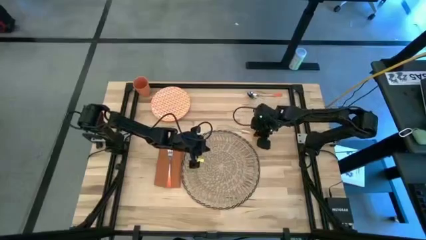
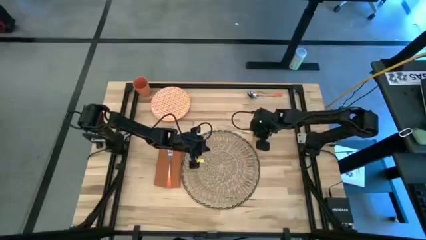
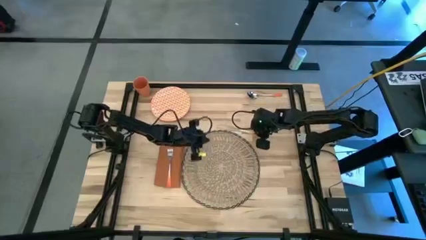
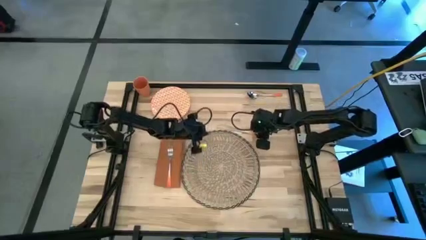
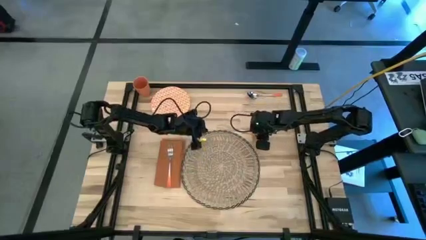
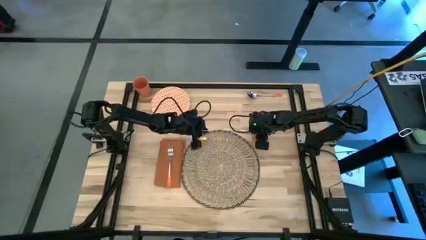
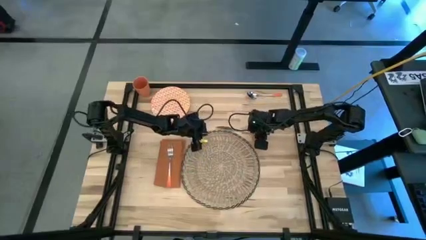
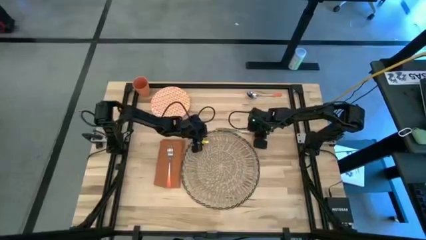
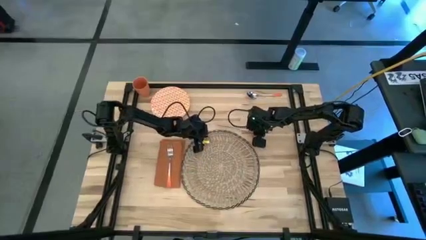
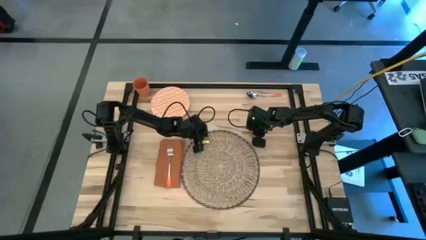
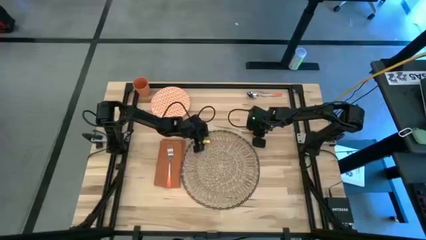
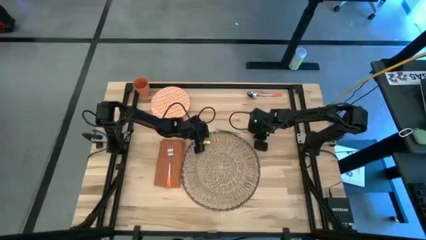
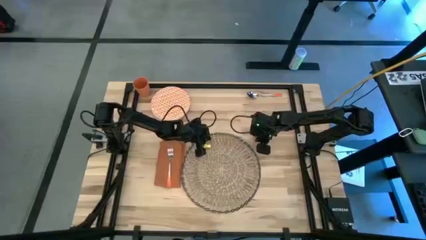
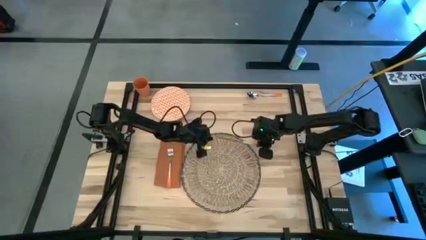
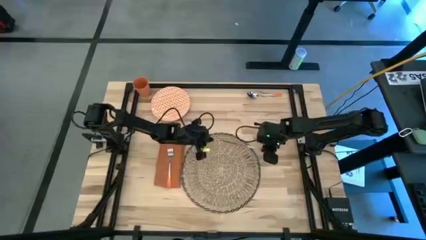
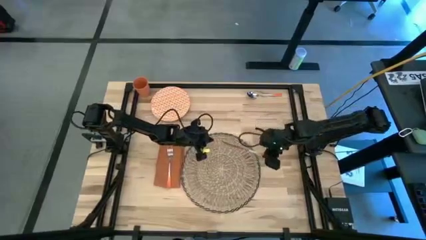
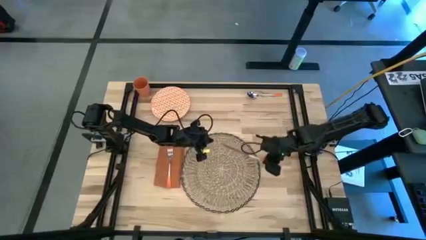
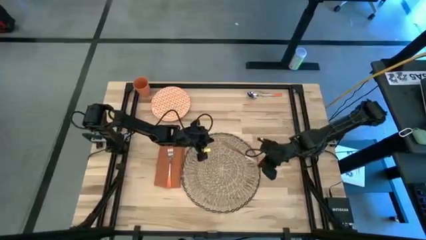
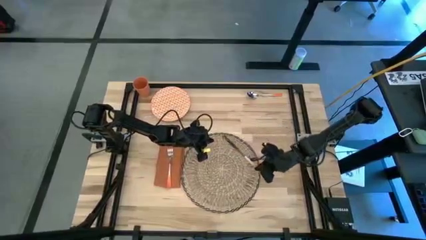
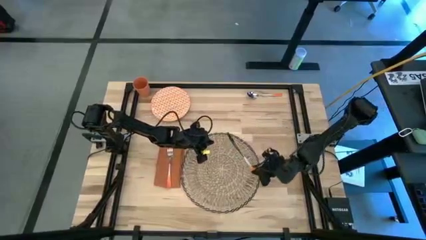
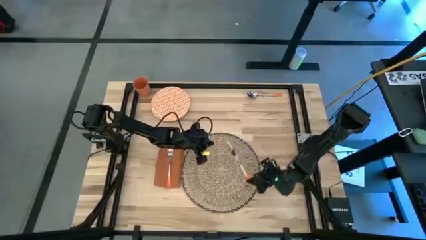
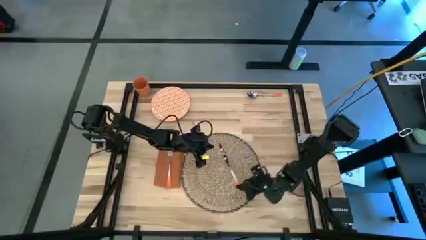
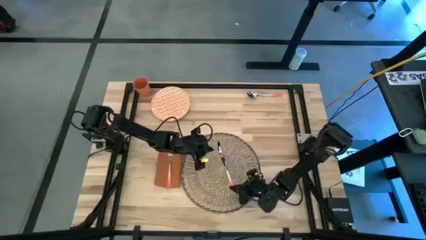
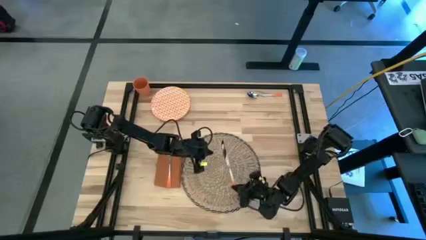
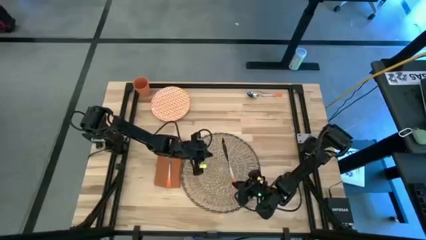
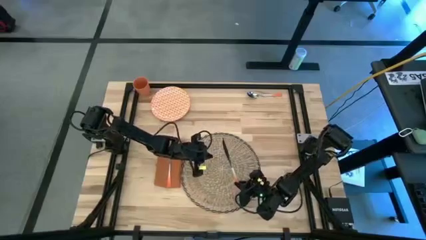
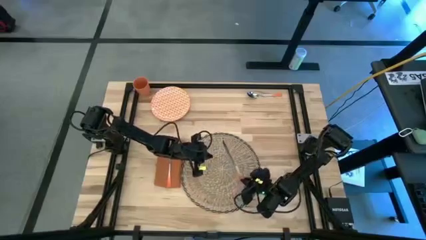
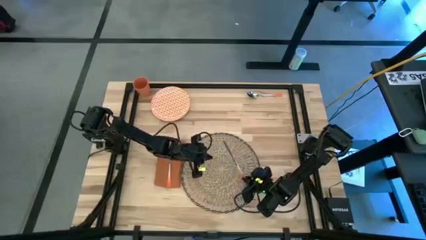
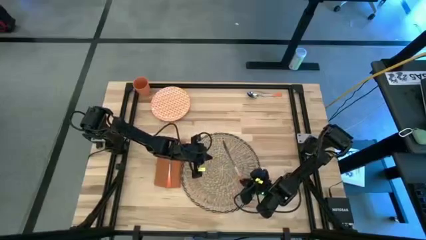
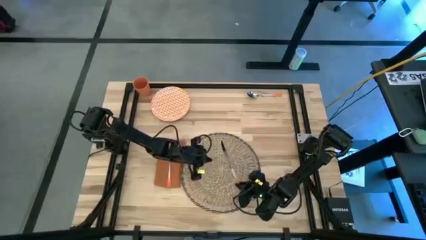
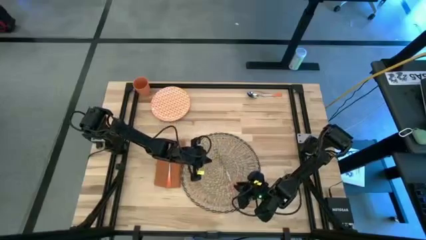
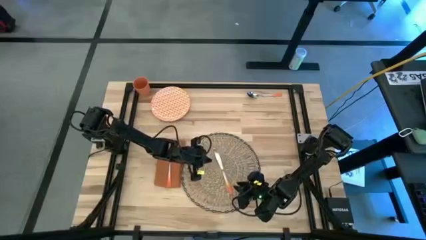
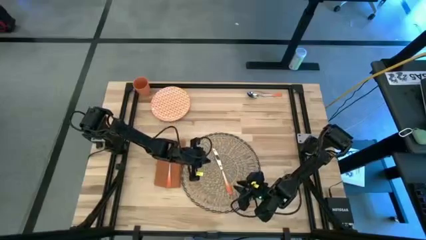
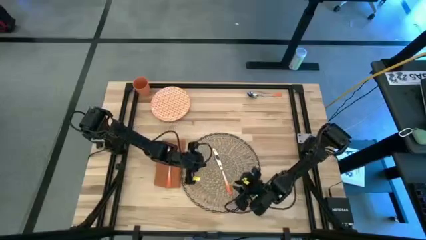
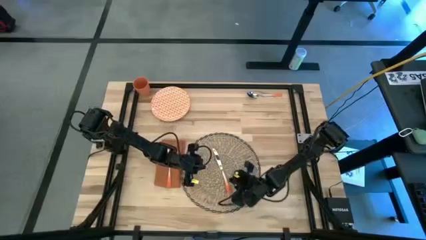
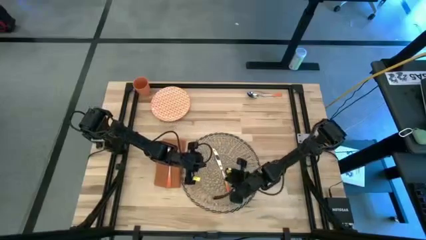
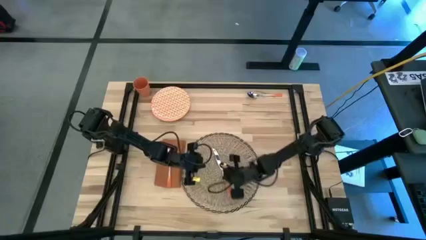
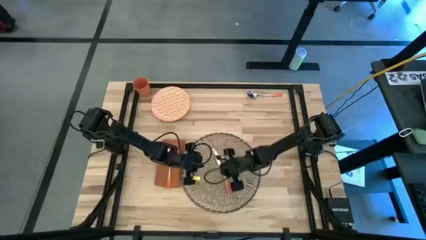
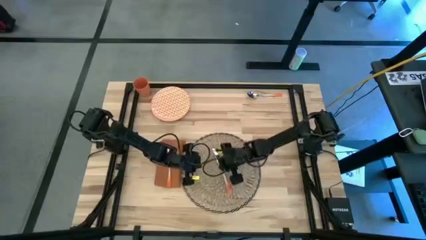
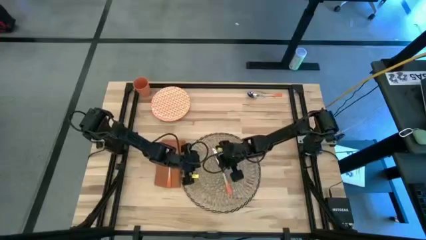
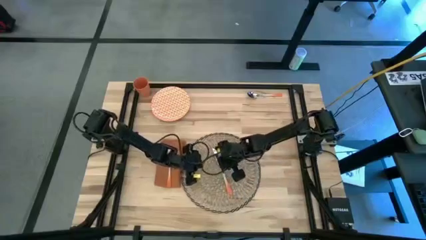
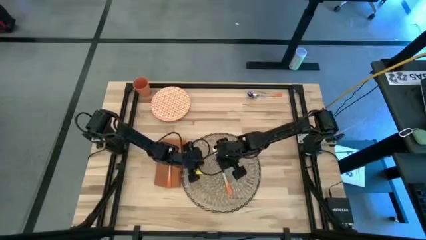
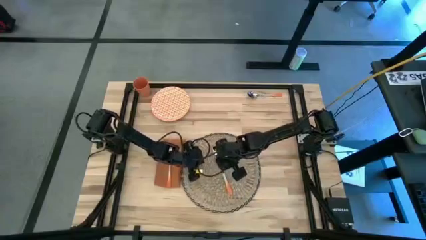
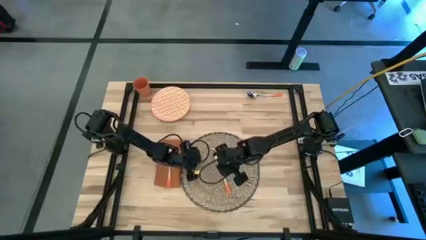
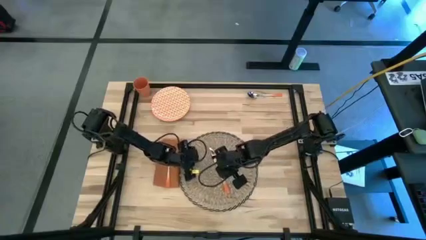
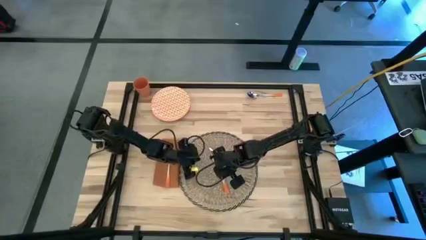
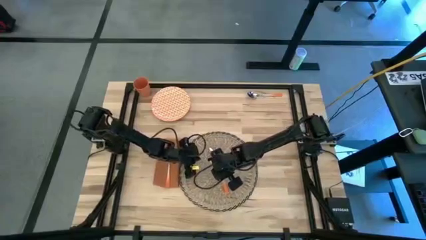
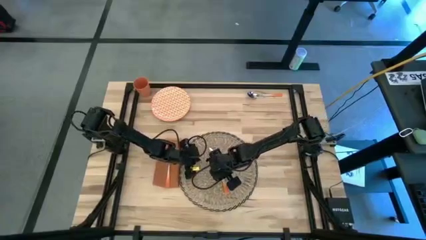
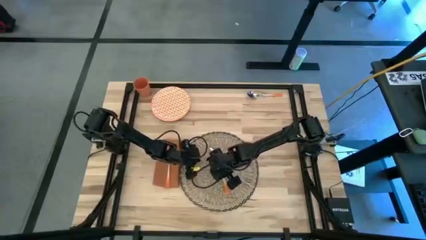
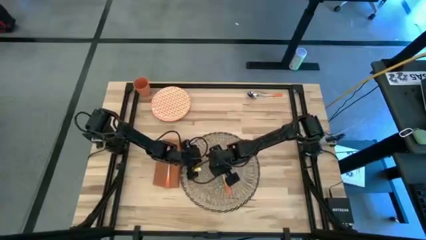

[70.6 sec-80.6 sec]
Task: Set table place
Put the orange table knife to the right of the brown table mat

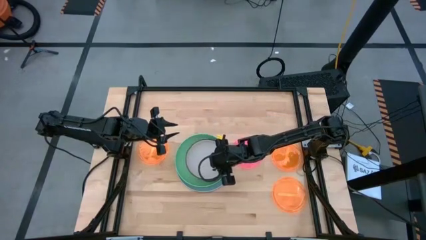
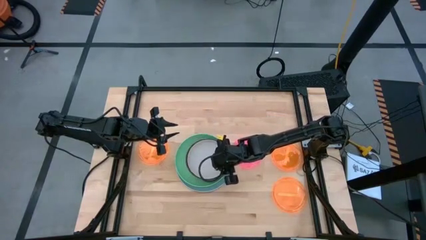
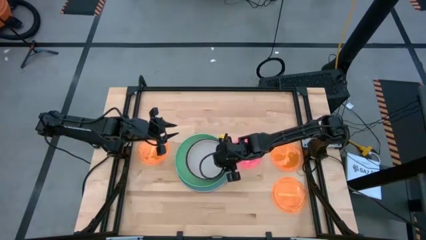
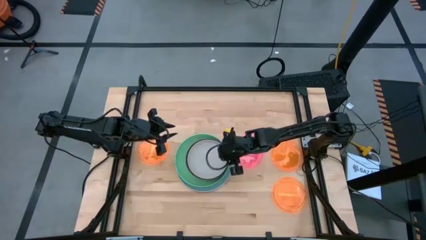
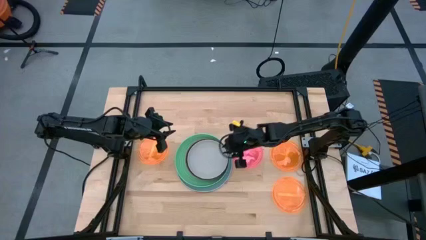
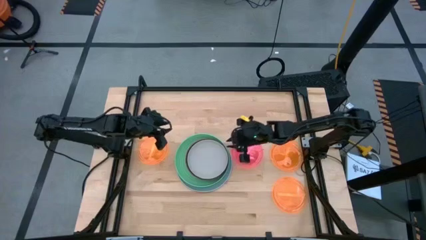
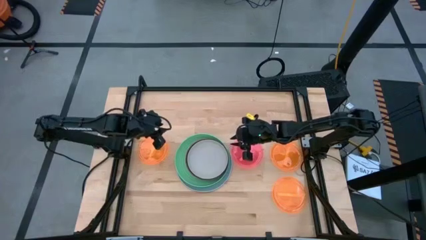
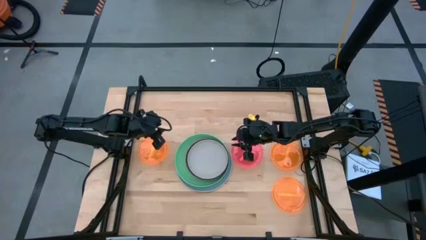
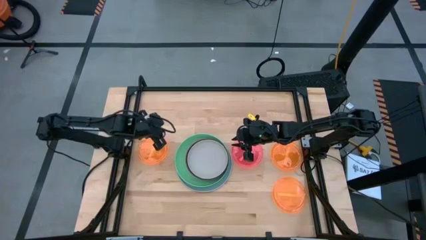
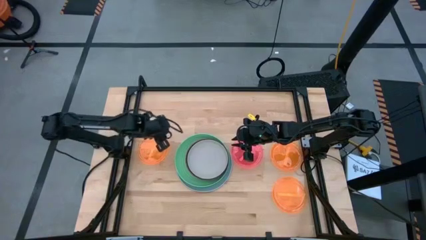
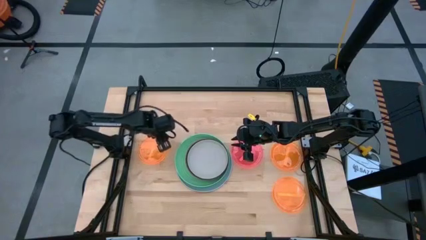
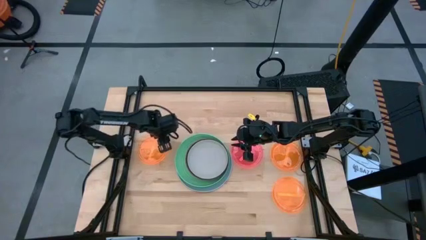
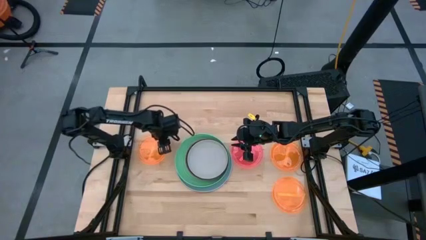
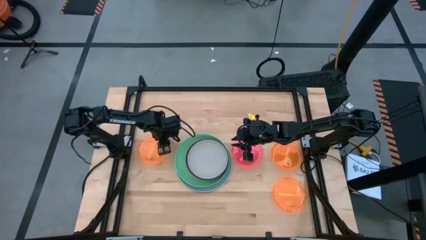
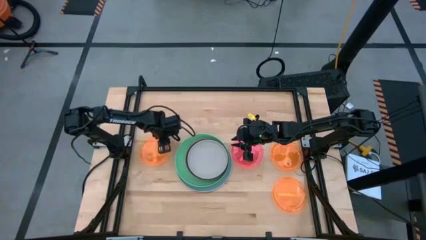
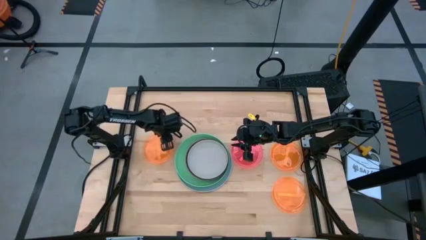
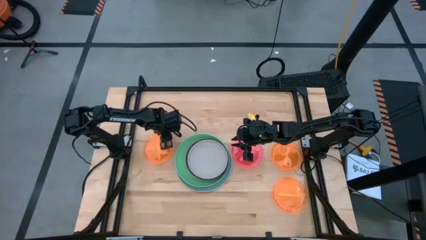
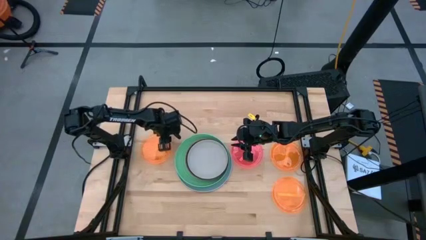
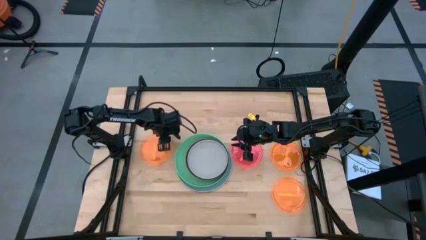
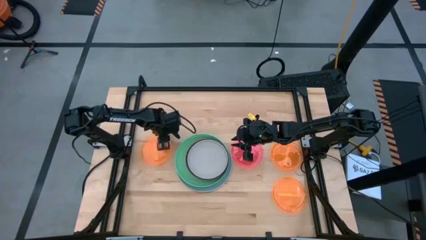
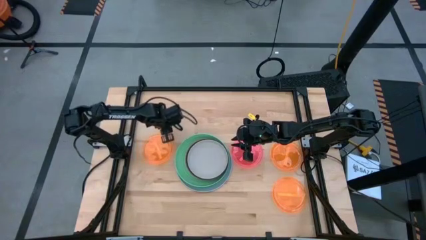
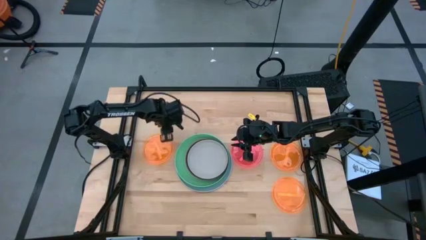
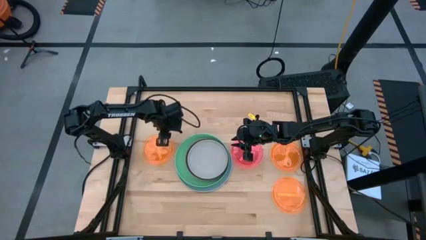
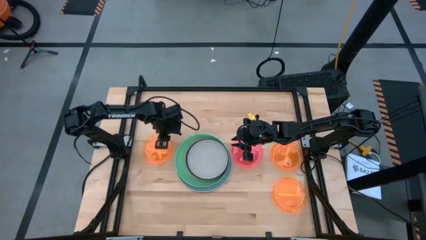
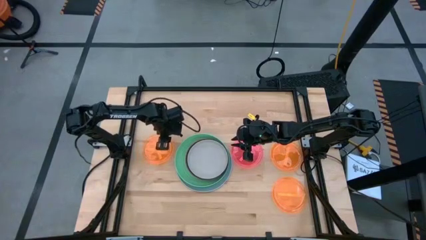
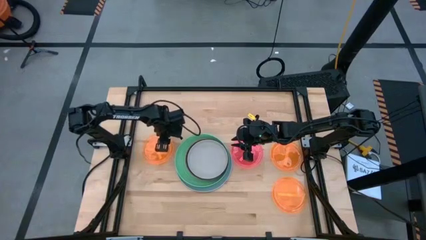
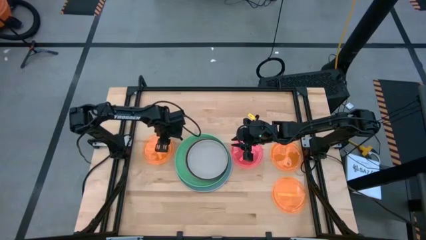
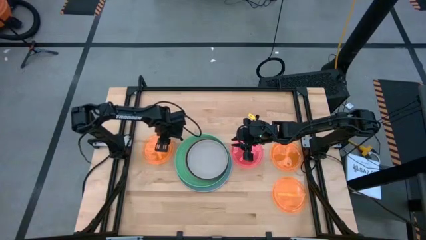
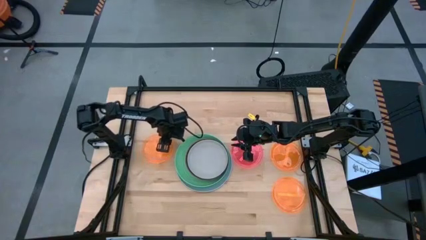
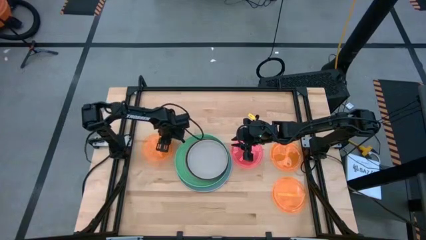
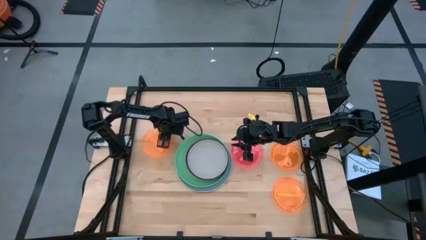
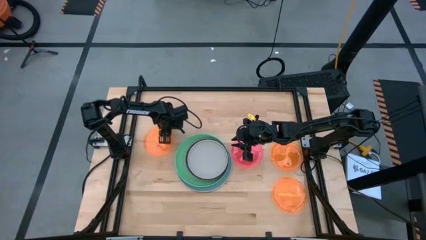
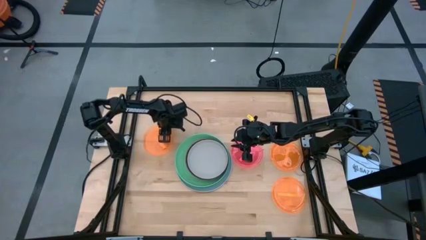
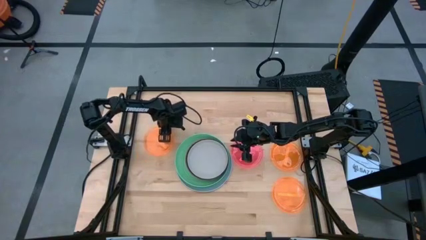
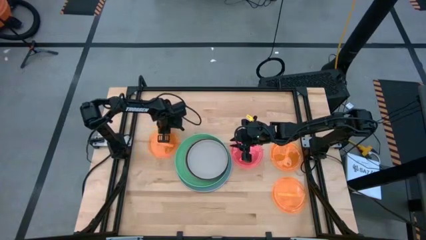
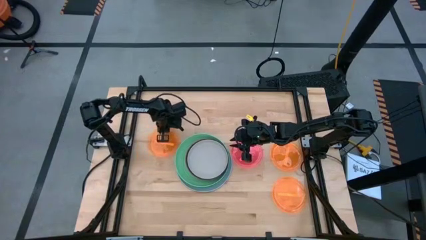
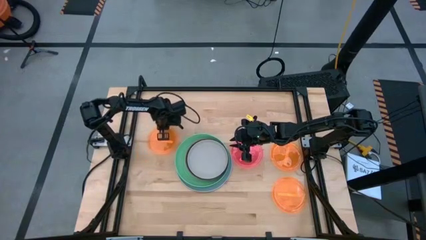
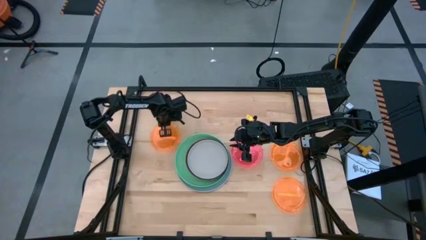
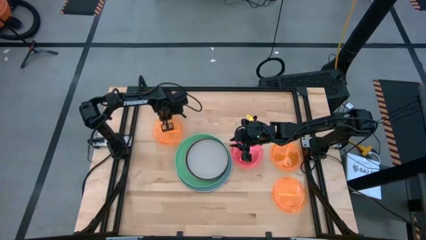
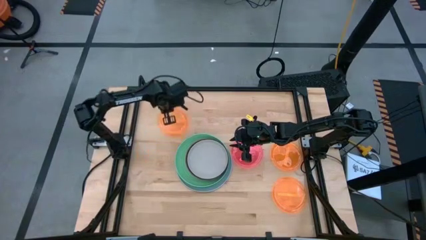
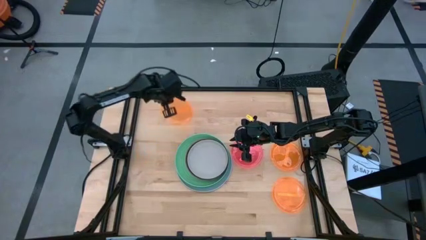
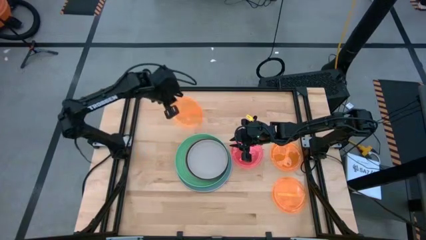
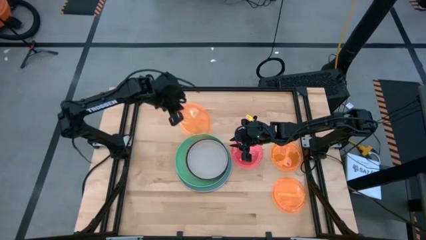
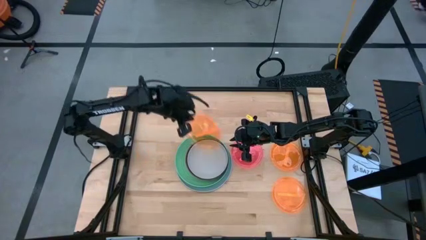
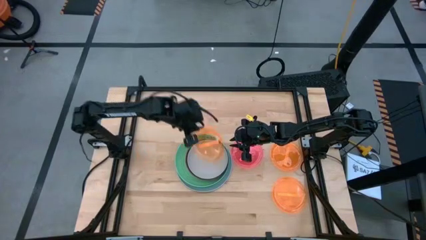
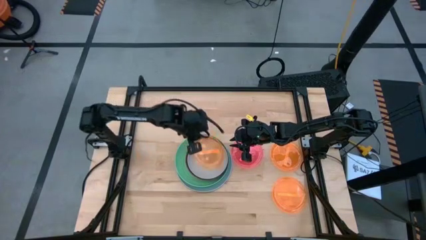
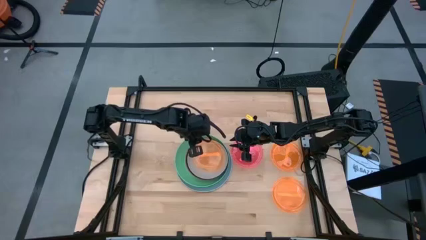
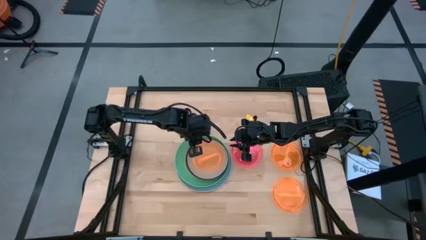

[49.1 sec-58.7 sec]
Task: Stack plastic plates
Stack the top left transparent orange plate on top of the white plate
